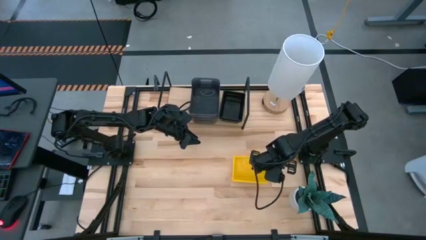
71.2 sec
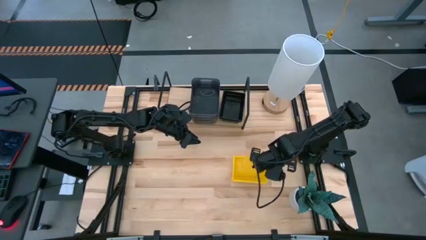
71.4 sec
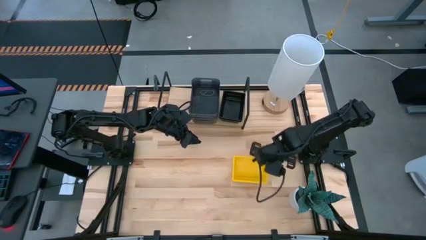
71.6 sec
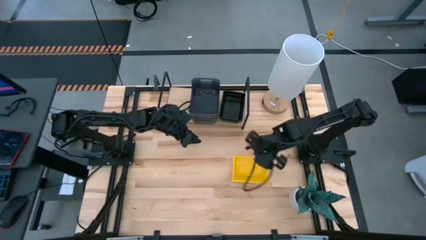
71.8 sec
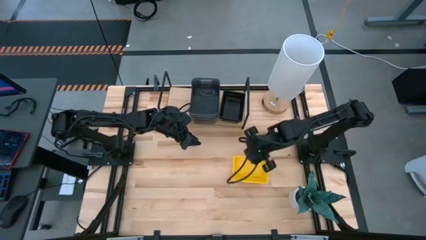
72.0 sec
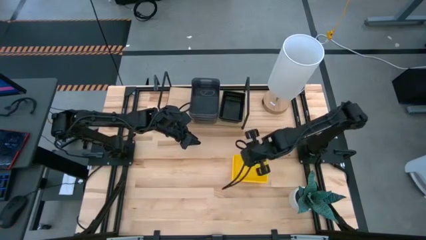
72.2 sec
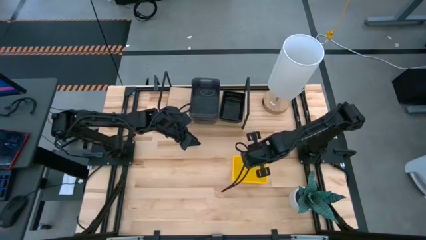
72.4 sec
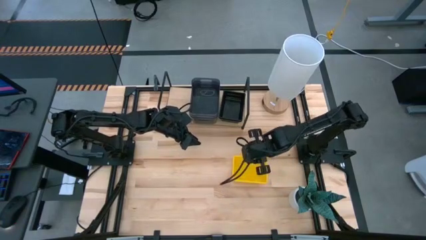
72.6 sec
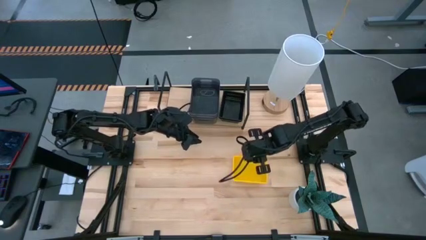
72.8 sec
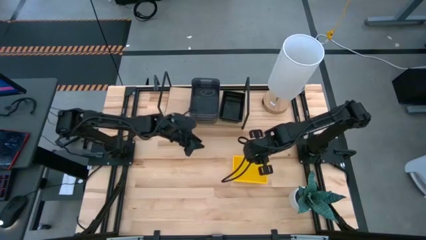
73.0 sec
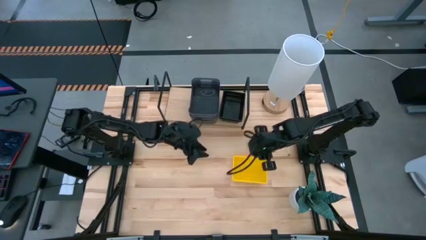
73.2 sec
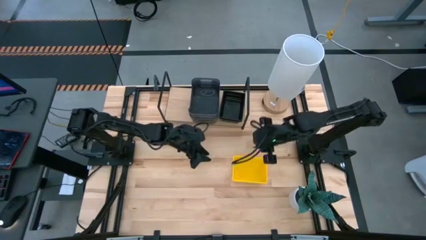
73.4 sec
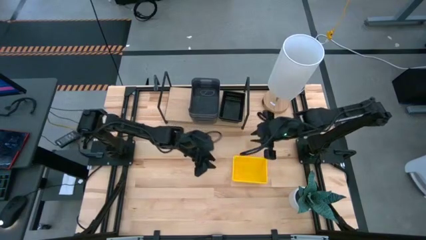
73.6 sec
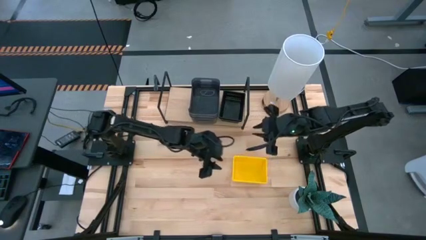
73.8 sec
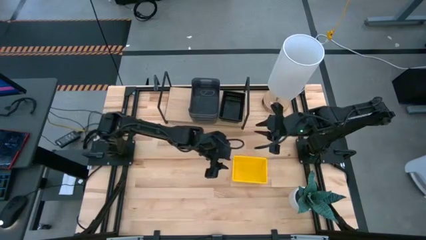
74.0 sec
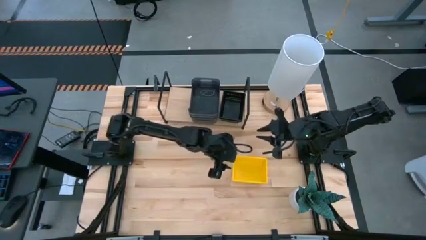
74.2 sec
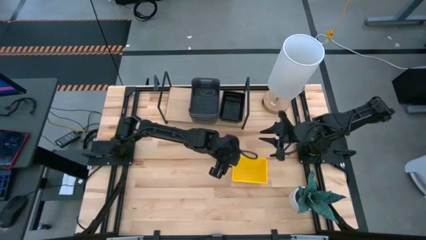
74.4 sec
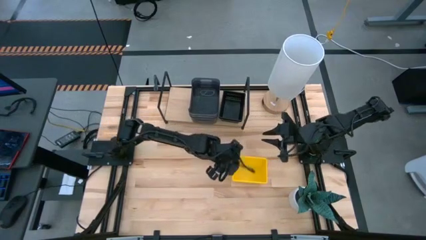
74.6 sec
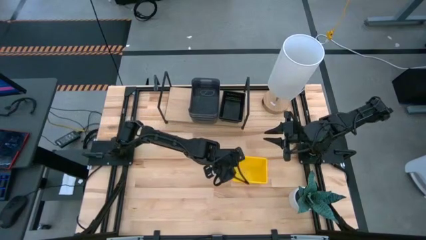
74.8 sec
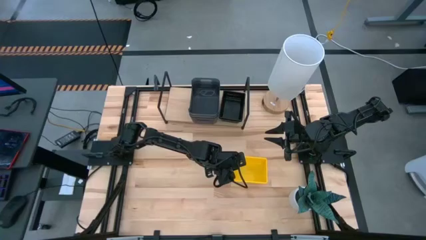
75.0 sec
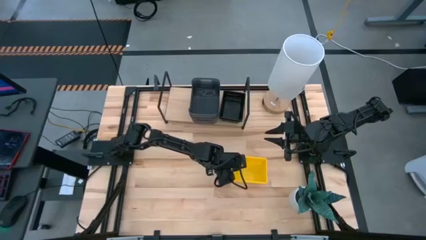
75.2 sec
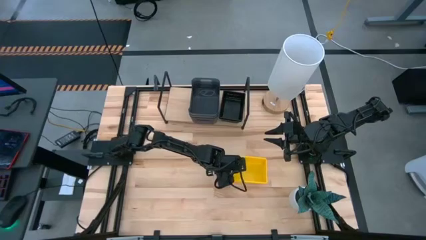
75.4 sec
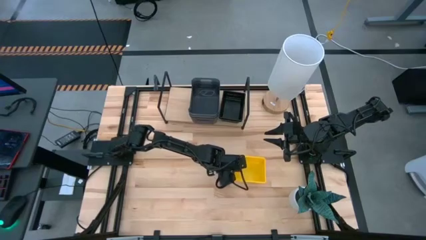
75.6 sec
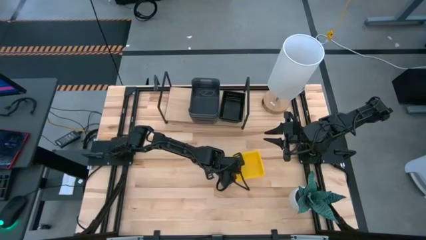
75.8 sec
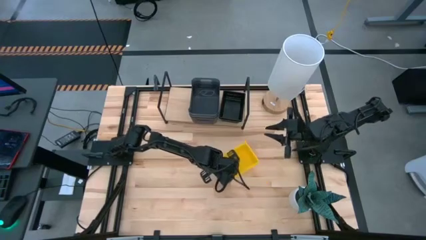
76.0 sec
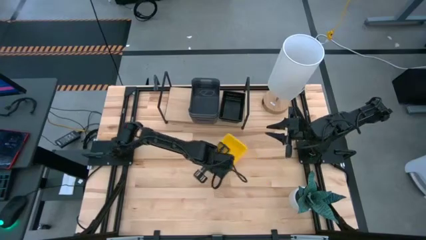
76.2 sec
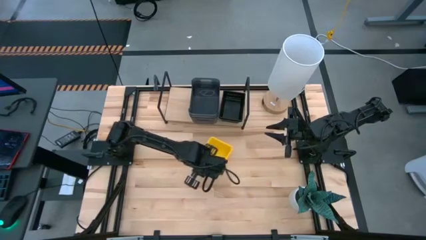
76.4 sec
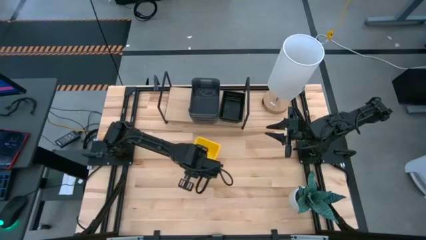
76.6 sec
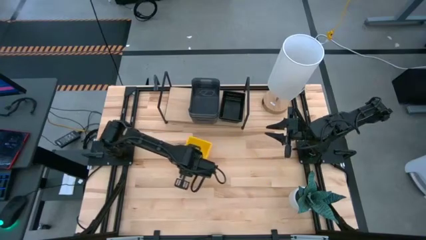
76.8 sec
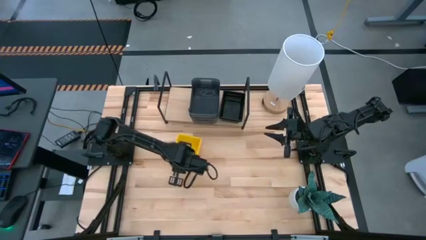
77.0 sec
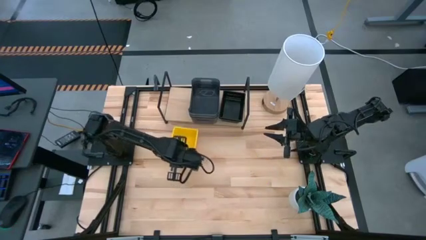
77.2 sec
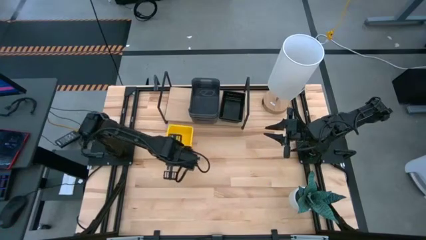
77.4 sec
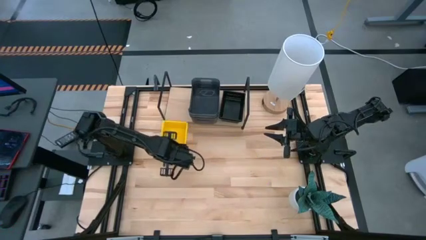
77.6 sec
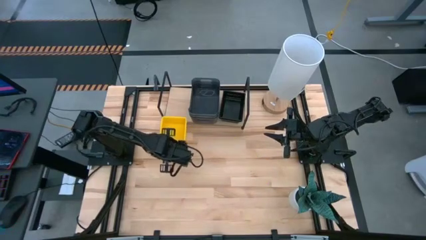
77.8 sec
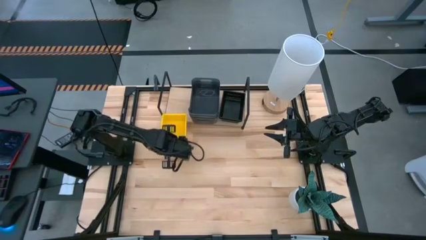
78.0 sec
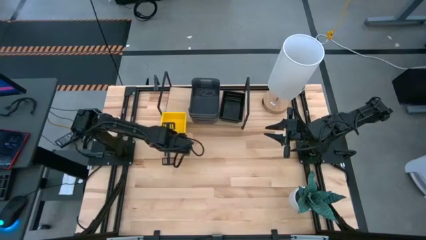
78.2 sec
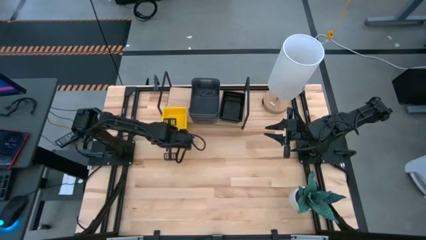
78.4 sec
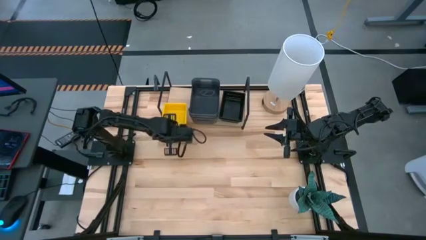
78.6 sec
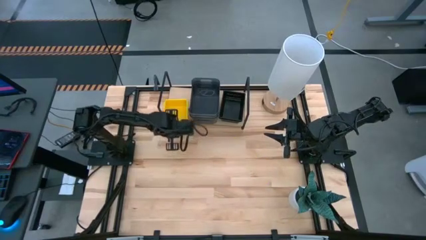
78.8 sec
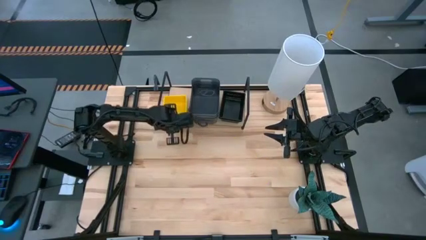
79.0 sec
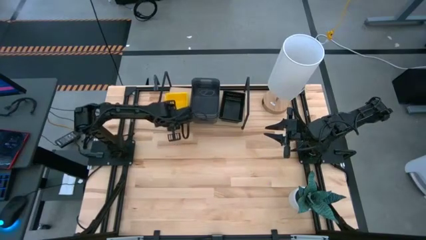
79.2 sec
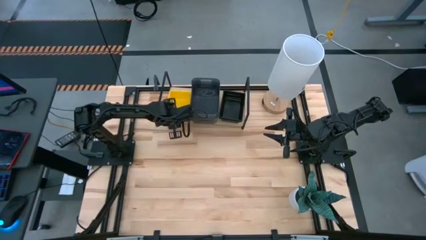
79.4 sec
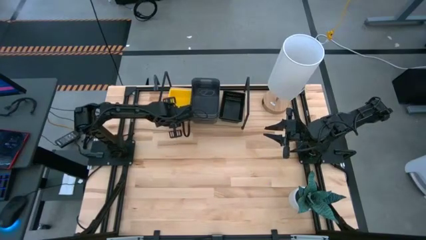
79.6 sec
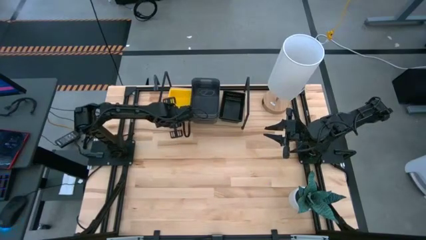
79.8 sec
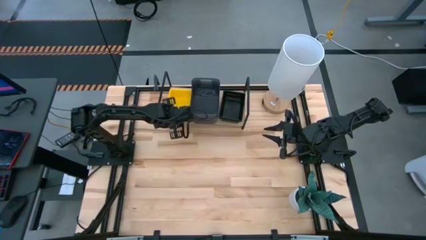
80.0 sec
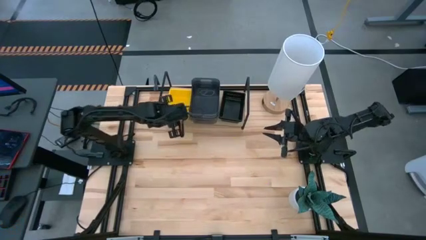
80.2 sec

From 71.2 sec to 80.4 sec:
Task: Stack baskets on shelf by color
Put the stacked yellow bins on the shelf

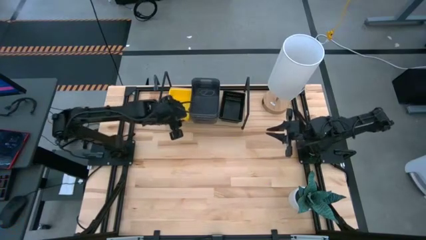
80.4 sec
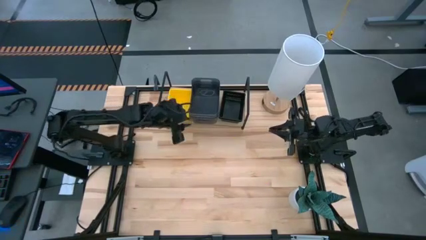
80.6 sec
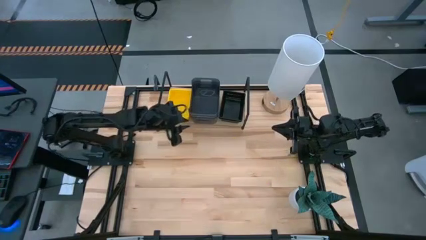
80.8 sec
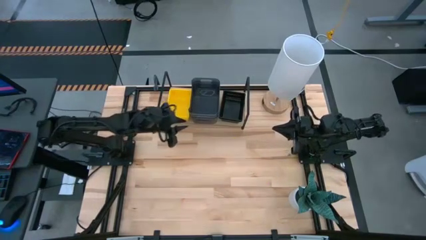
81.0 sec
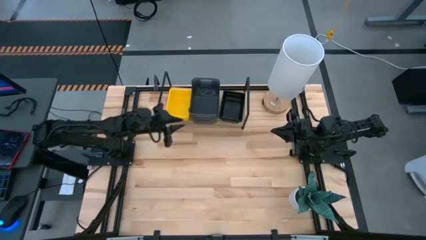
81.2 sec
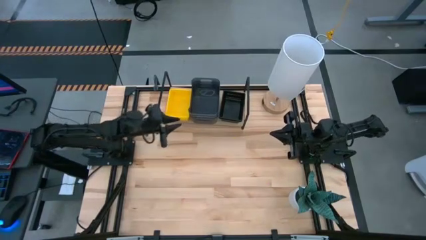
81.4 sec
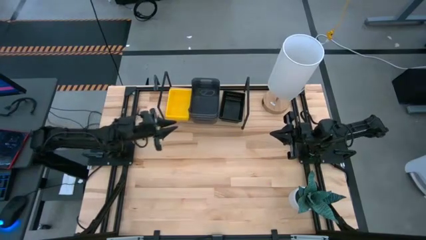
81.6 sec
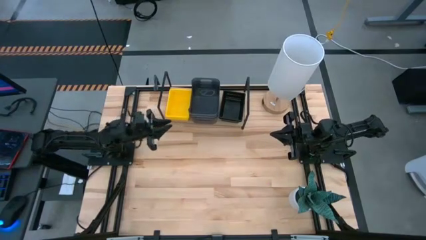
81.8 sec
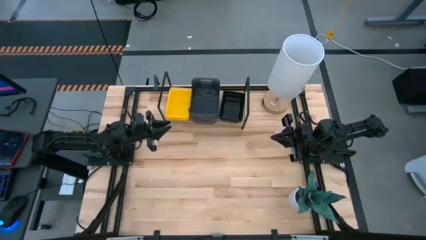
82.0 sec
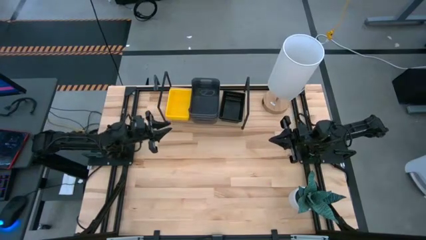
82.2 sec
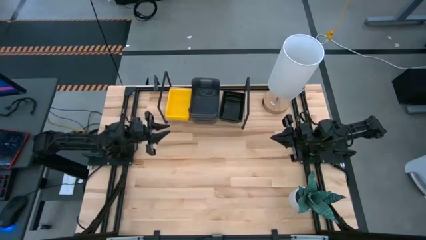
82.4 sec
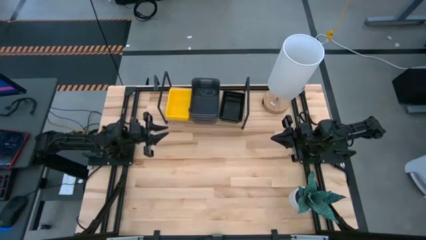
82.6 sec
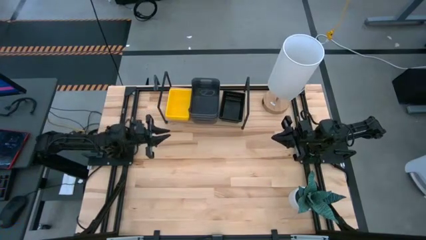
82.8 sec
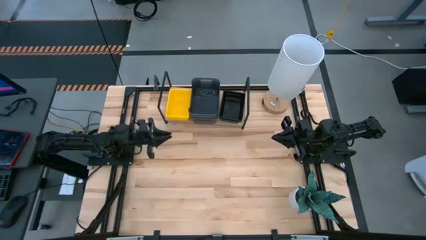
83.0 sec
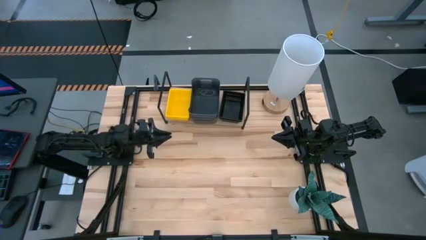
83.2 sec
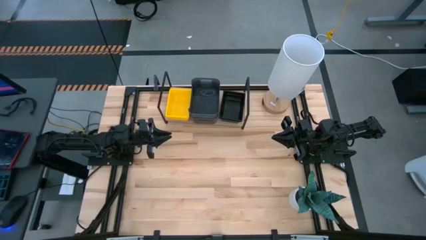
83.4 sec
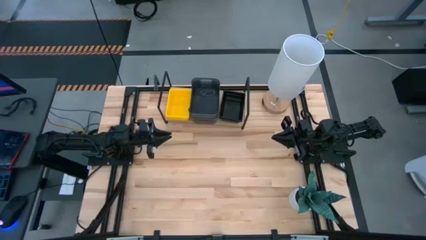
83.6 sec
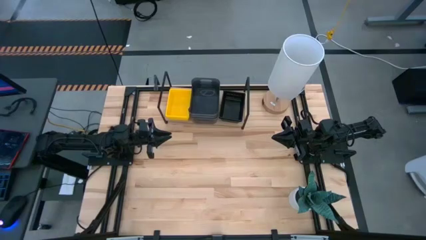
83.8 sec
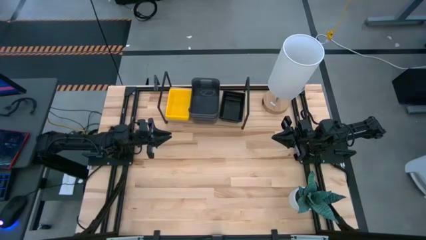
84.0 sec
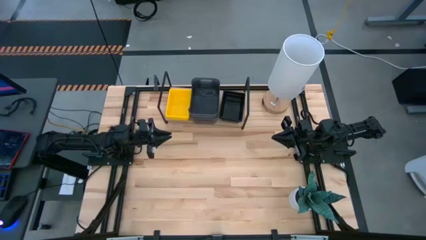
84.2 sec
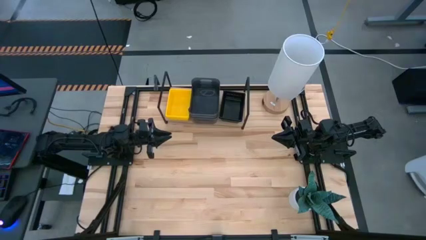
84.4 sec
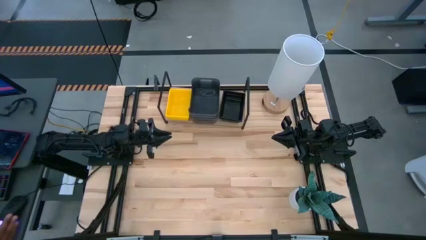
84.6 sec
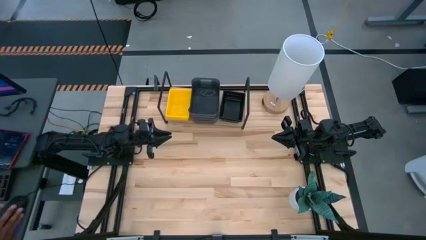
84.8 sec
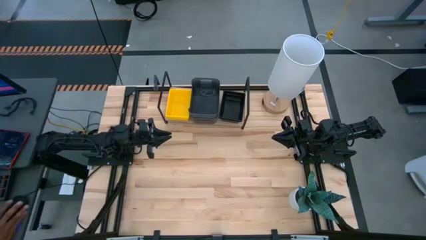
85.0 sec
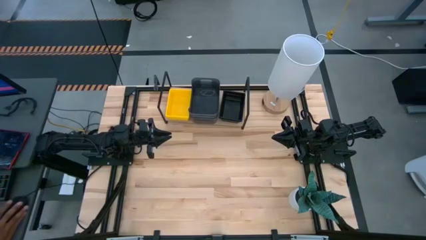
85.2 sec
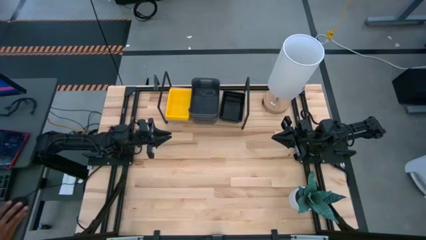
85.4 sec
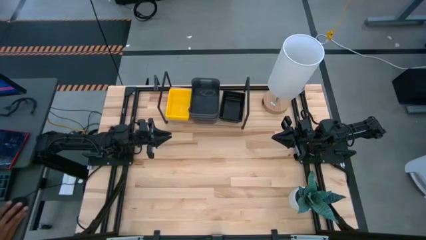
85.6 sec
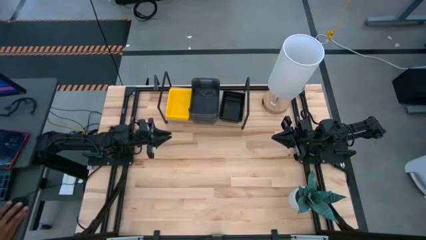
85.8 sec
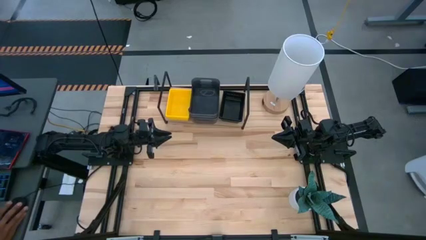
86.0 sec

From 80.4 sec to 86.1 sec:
Return to Home Position

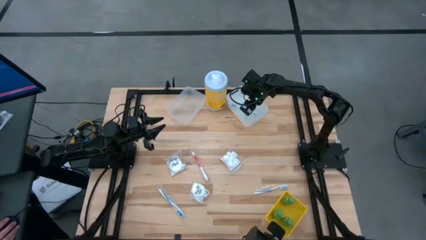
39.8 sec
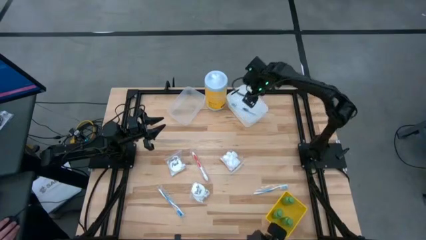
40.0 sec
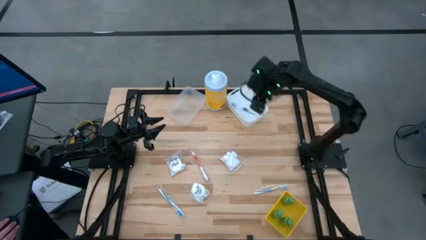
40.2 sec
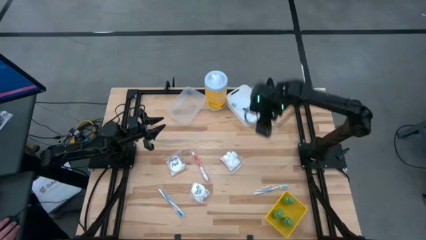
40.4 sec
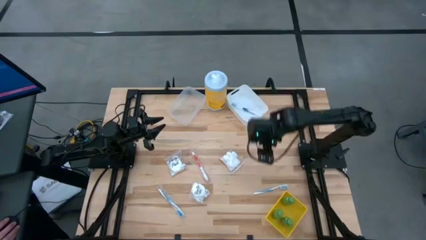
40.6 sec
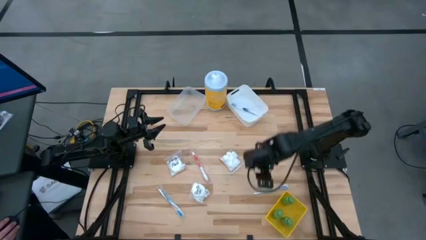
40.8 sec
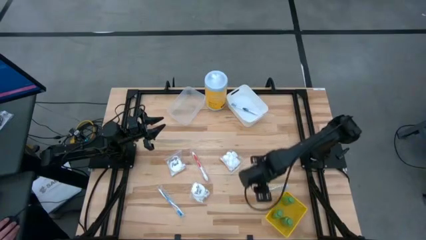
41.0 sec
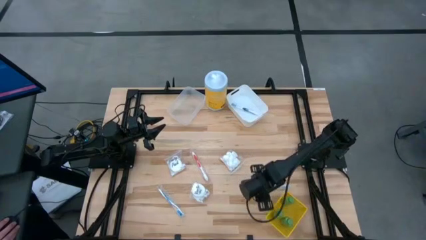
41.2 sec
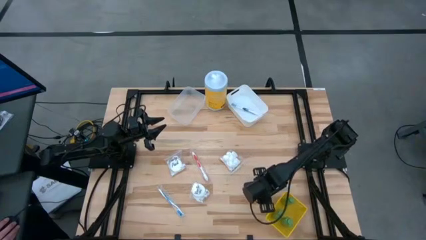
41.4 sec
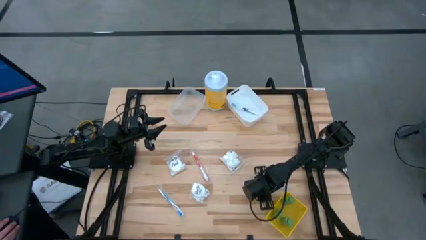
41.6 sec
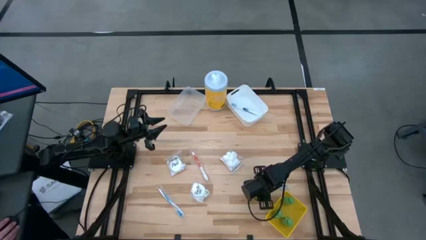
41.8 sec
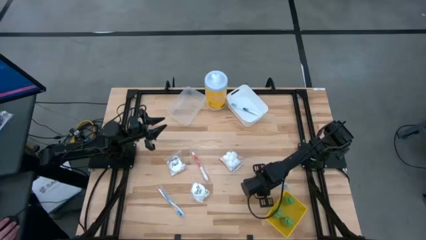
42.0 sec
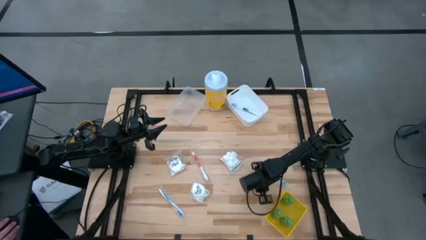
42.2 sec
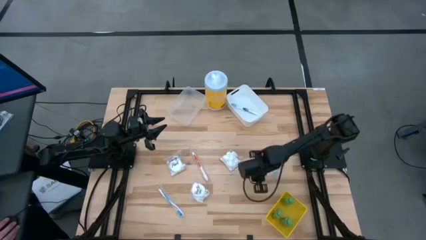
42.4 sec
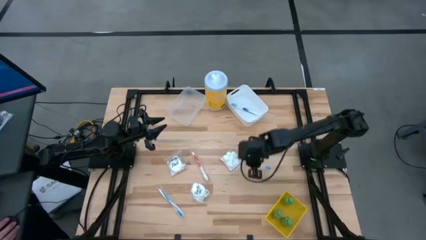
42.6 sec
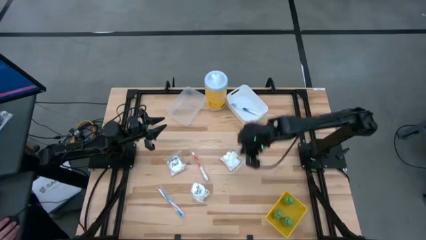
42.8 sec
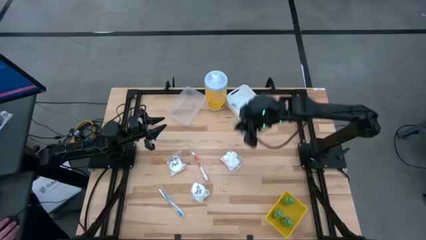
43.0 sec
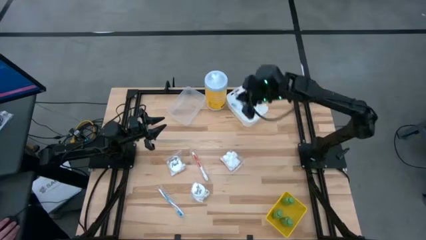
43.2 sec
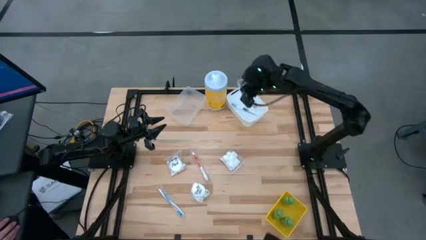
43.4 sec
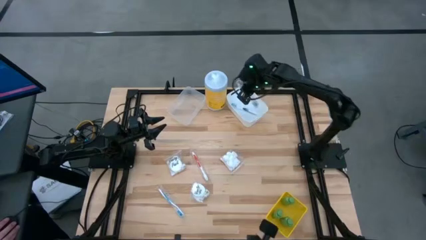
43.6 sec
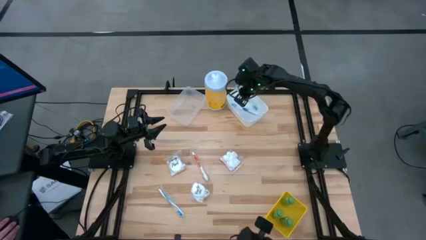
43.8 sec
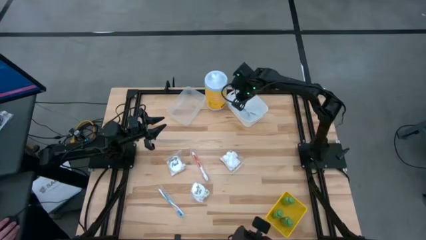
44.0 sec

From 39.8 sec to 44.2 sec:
Task: Pick & Place Travel size toiletries
Put the right blue toothbrush into the white bin
